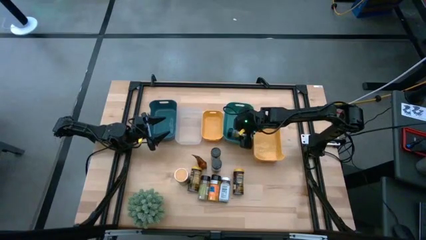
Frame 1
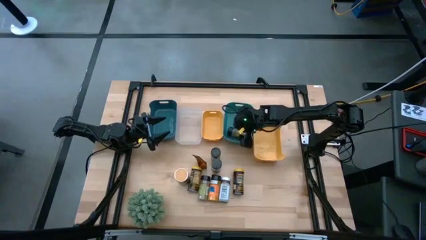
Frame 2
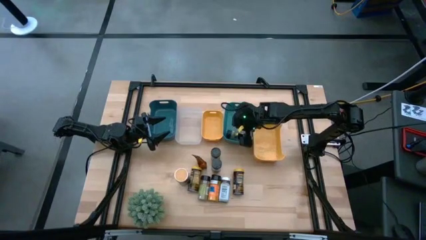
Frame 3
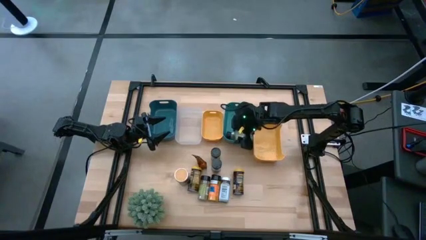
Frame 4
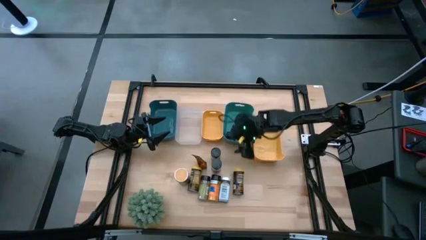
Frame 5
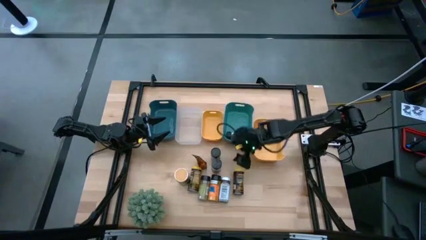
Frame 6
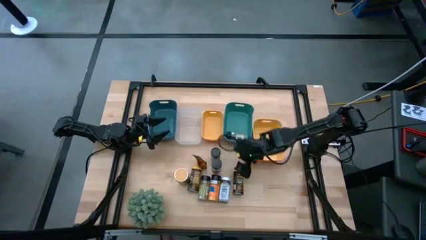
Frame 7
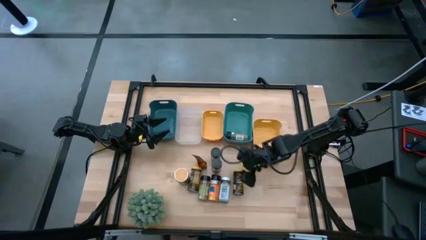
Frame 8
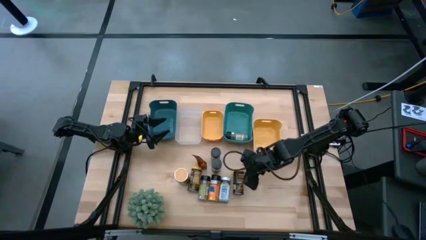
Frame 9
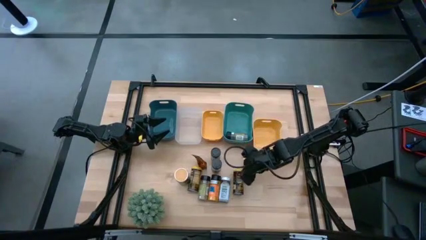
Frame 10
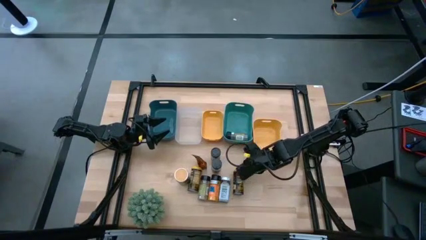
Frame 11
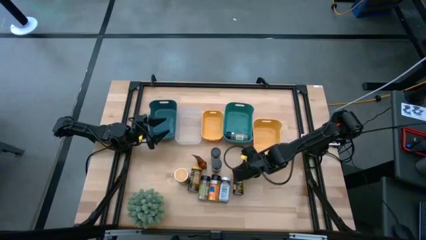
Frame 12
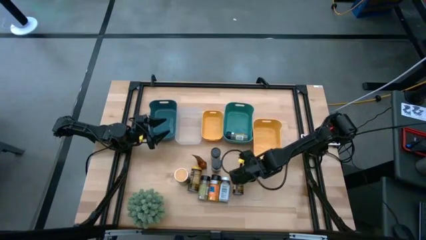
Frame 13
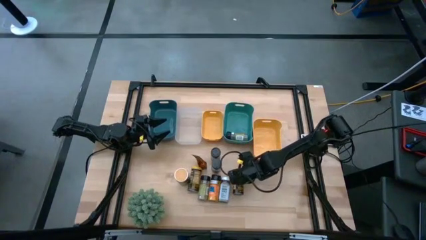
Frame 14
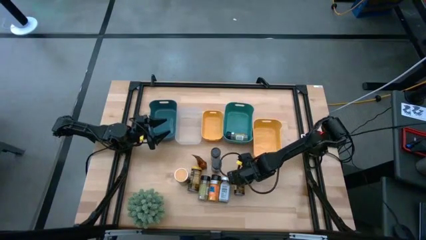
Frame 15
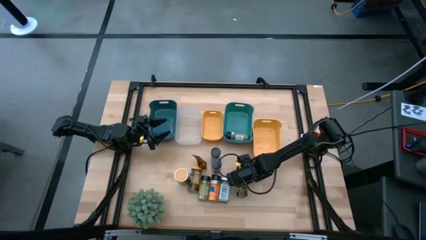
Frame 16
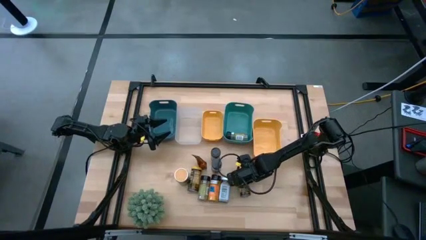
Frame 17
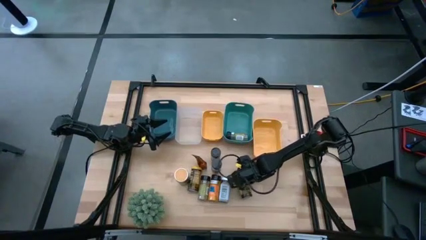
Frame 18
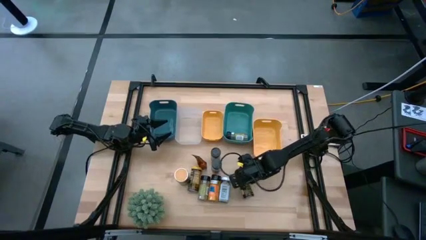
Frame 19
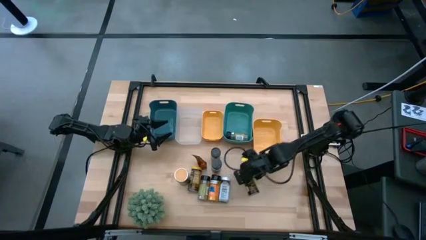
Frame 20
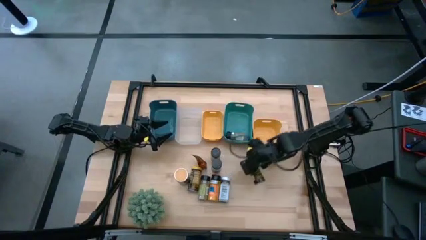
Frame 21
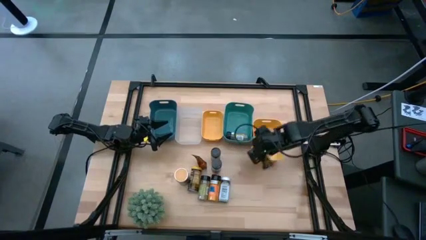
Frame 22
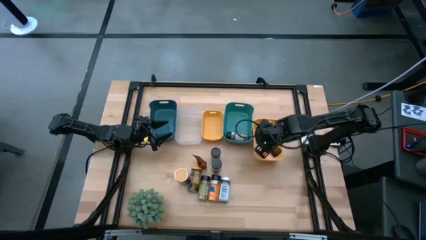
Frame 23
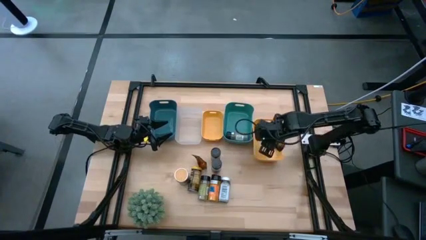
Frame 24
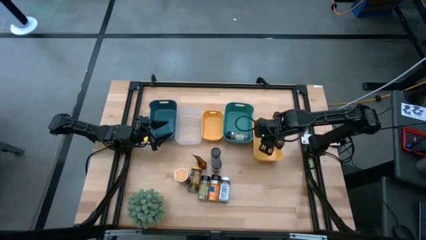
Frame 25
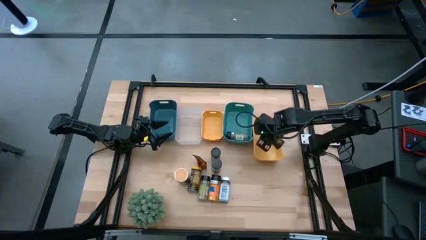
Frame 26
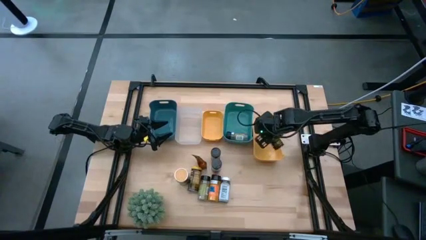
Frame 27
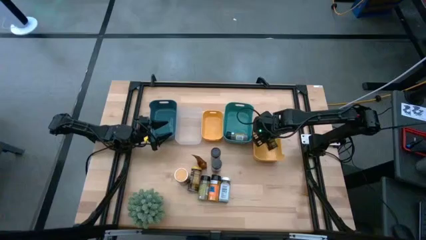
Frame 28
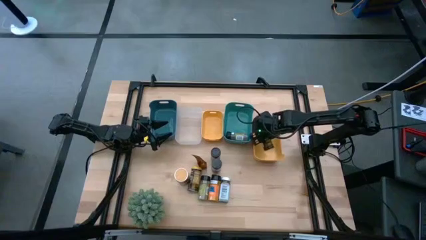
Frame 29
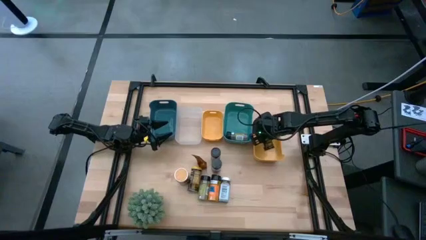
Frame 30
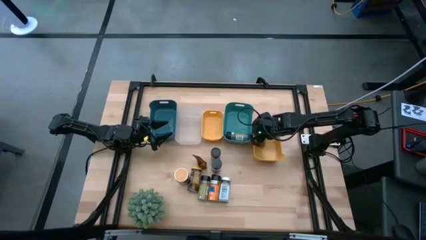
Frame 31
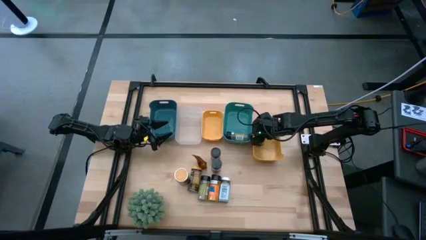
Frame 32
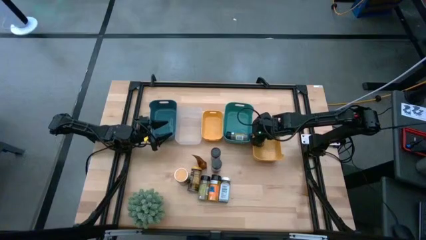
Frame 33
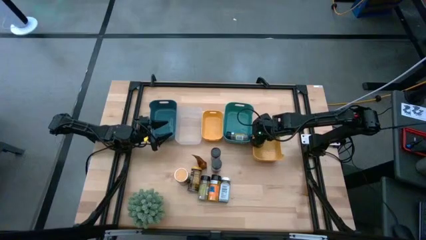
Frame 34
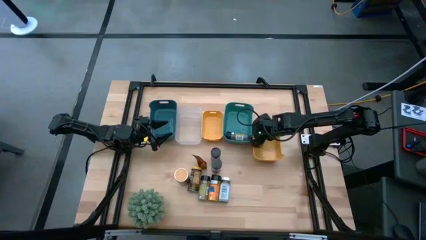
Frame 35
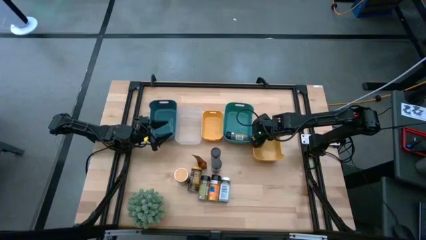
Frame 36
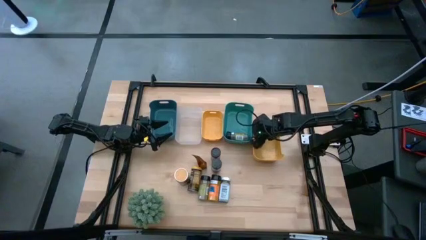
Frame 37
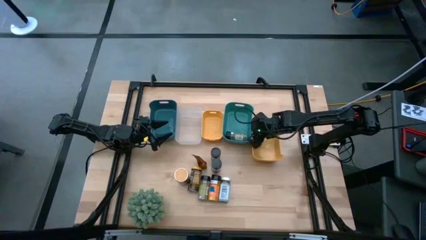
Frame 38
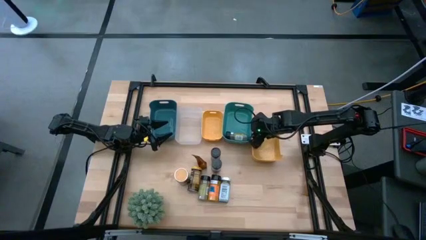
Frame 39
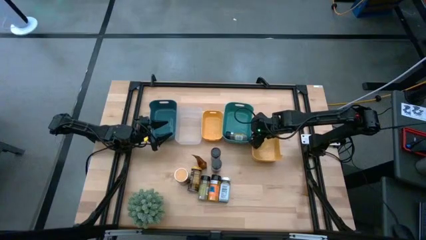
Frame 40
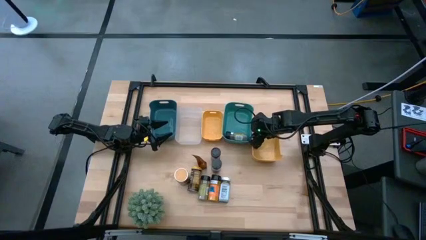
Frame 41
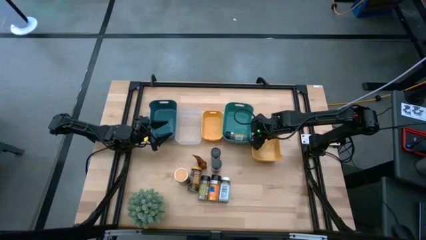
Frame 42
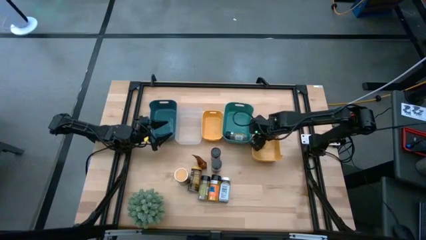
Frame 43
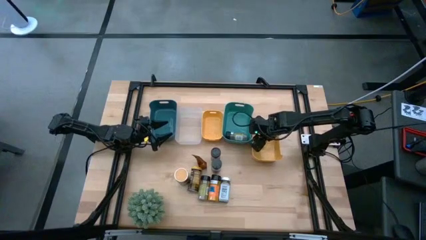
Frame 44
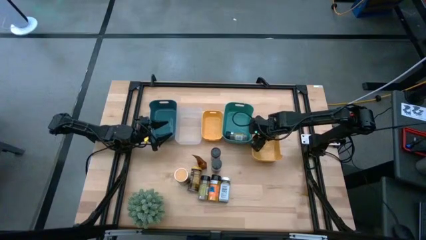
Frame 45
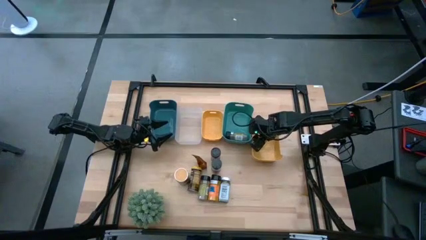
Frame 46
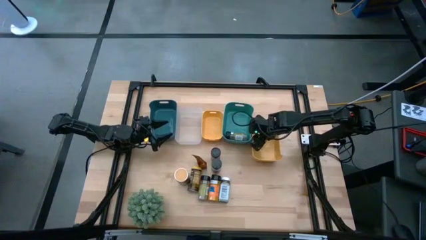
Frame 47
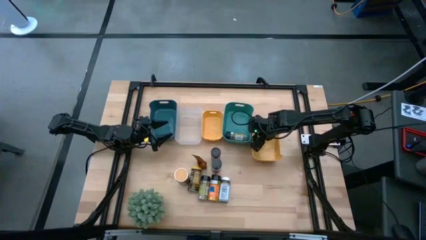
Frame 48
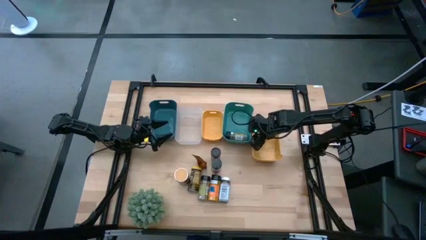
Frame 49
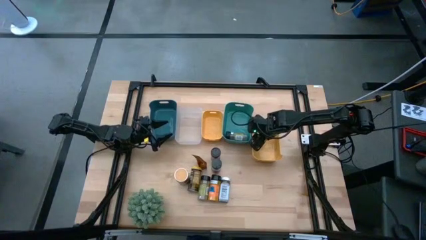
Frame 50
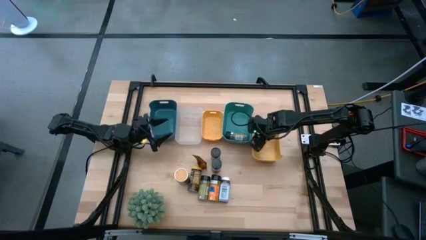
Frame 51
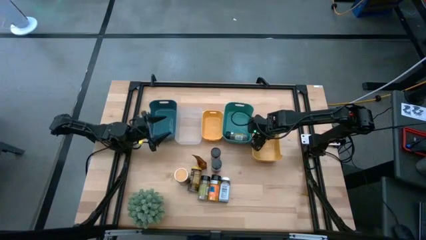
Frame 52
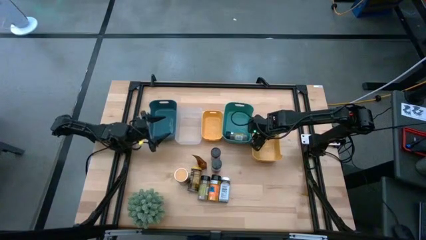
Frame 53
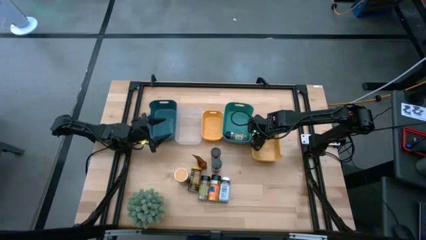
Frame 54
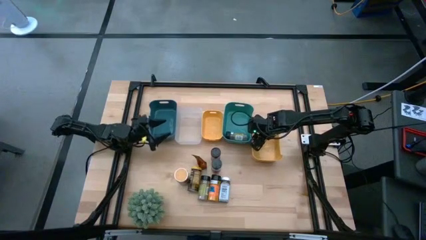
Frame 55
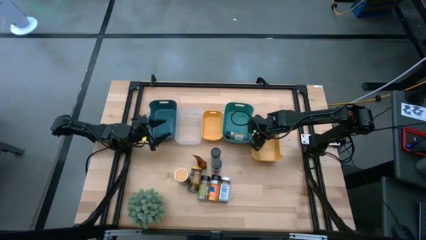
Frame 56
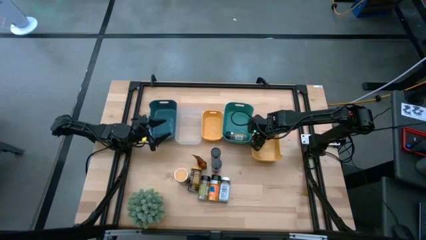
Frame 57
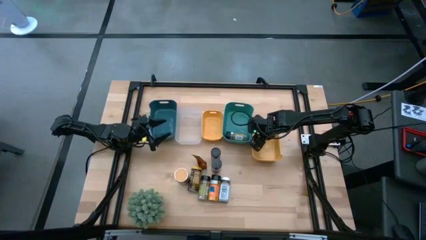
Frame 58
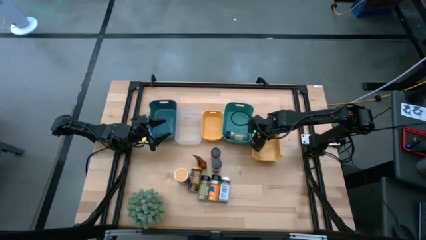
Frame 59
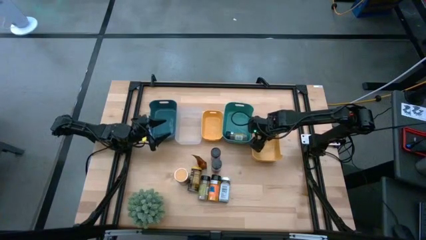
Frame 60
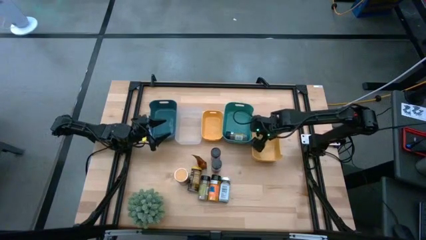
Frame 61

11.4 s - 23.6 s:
Task: Sort spices by type
Put the yellow seasoning can into the right yellow bin

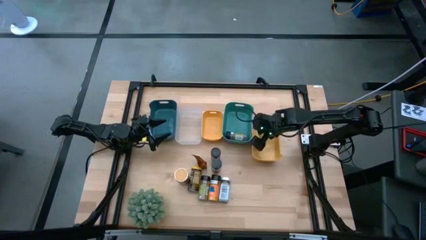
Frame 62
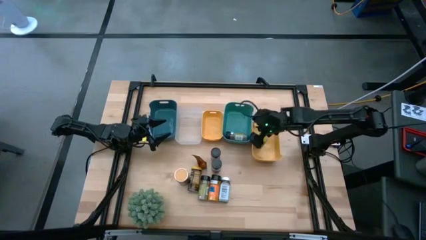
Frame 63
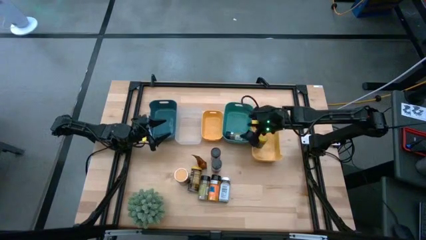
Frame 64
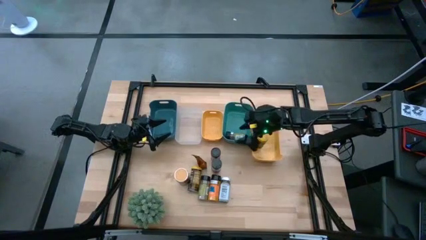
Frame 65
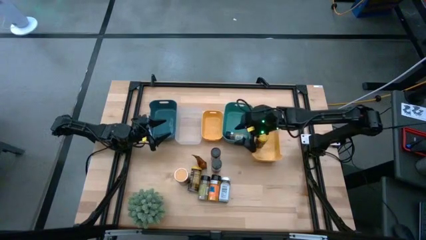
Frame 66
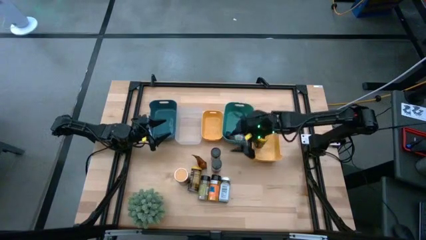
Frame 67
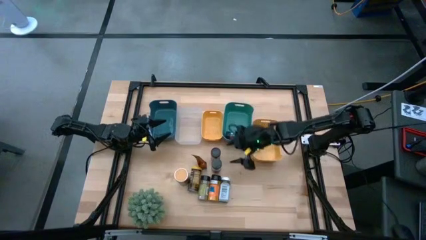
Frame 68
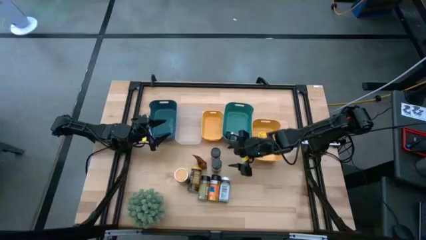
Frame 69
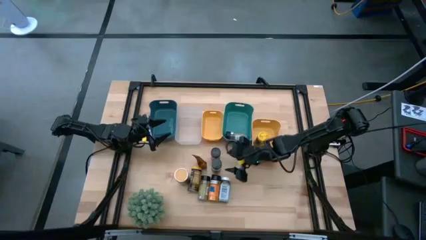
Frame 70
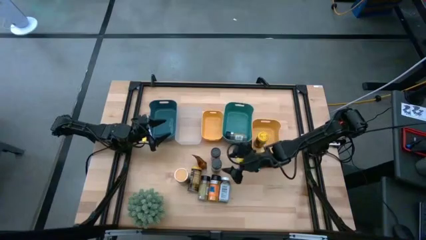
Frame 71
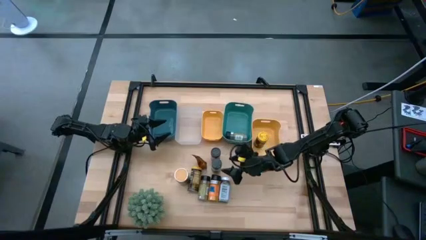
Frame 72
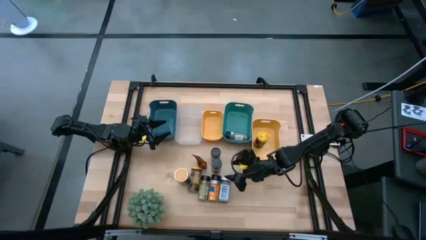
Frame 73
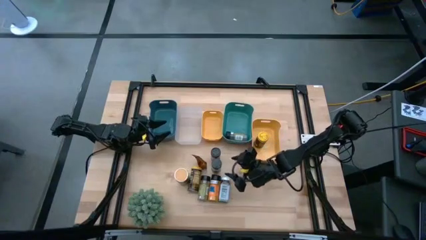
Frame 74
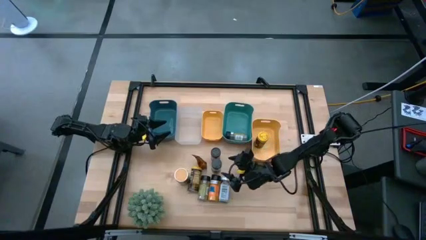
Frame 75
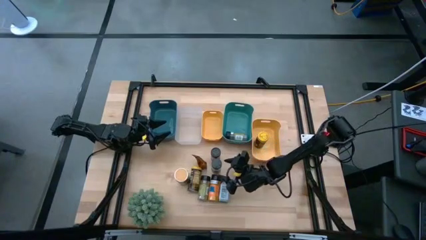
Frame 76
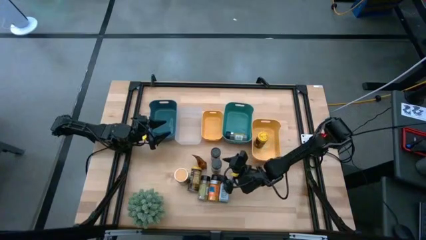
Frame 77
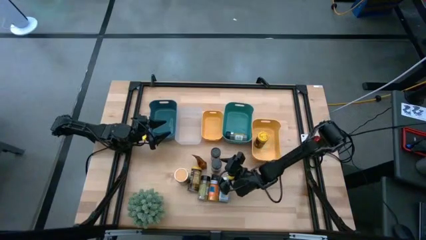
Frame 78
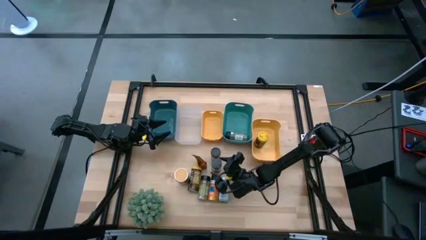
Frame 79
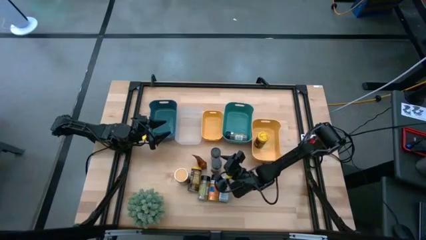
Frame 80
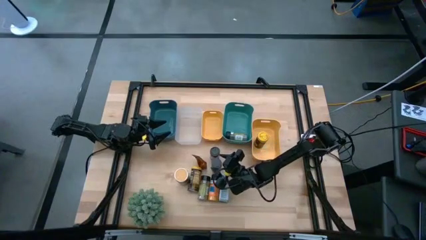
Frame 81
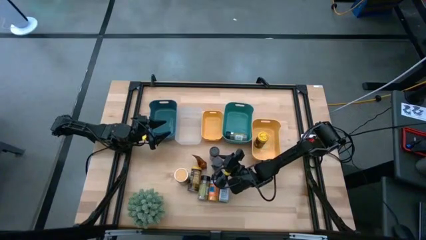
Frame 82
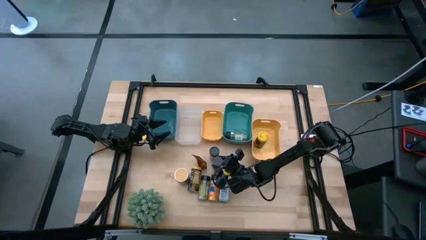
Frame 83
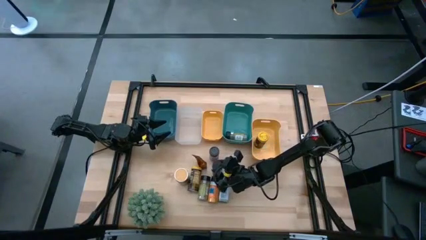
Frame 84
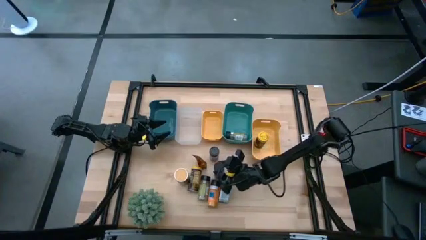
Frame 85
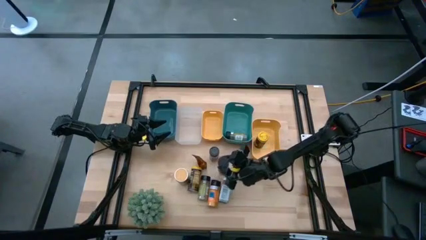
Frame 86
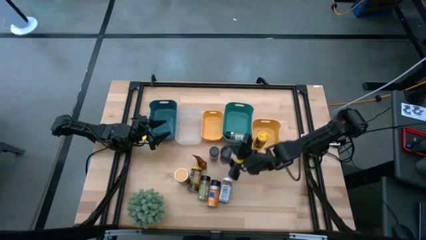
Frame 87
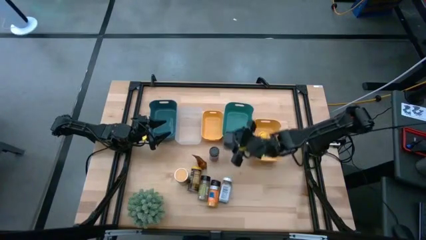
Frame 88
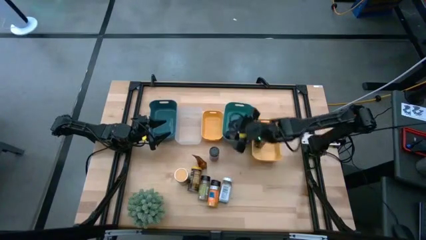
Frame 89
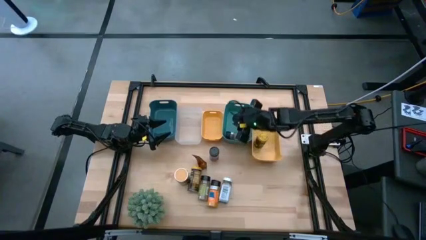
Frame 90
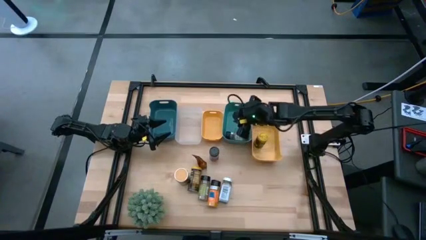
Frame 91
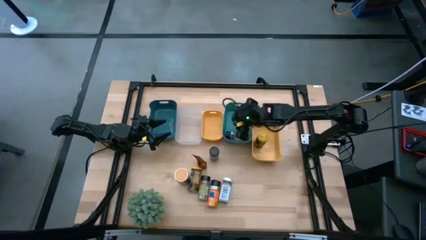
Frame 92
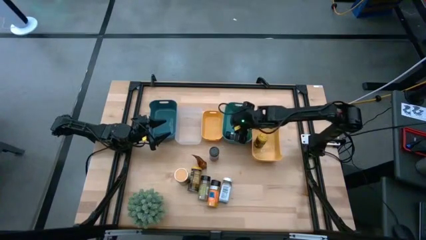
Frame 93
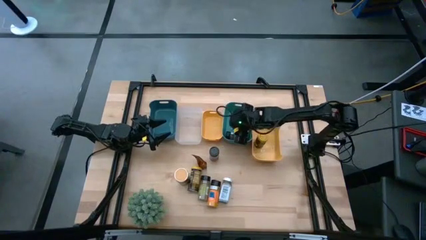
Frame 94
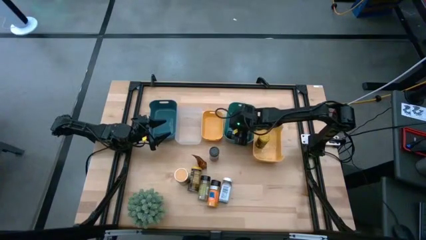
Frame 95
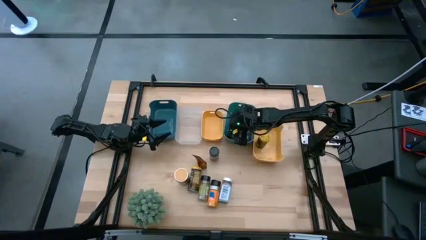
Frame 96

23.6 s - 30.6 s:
Put the black seasoning bottle into the green bin
